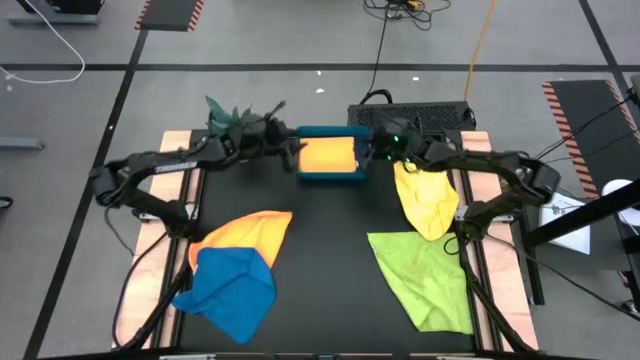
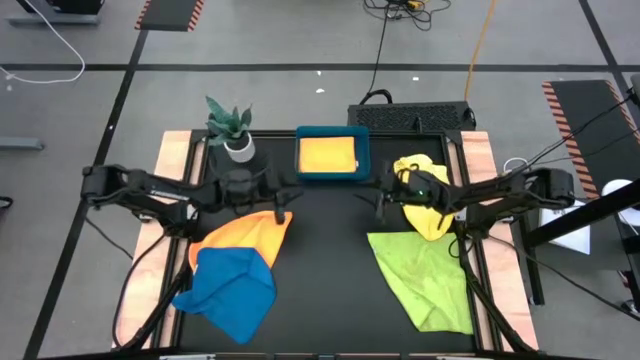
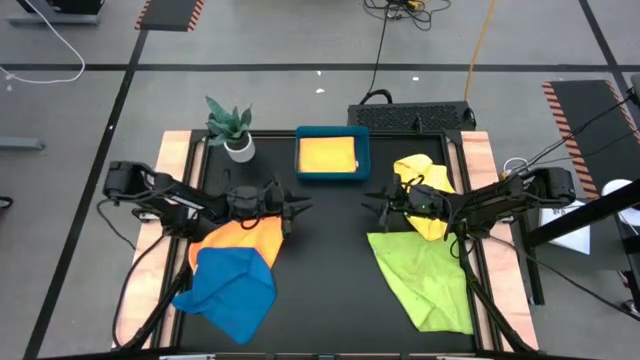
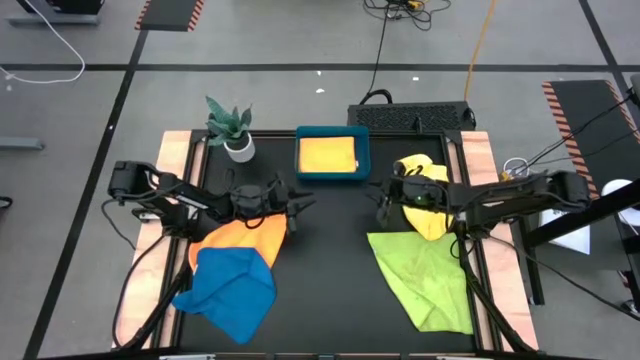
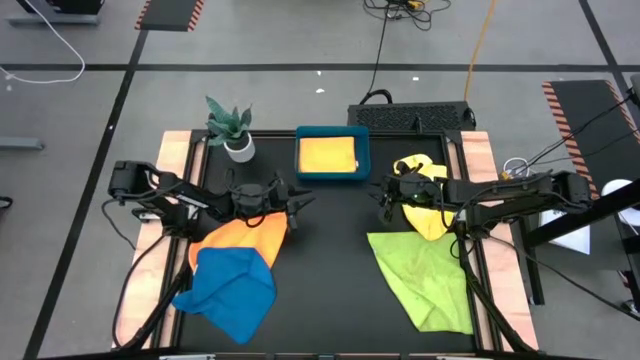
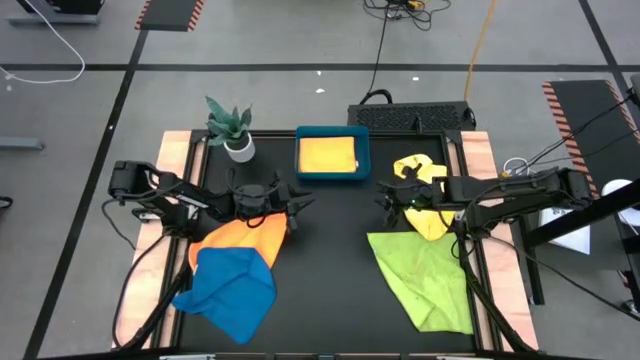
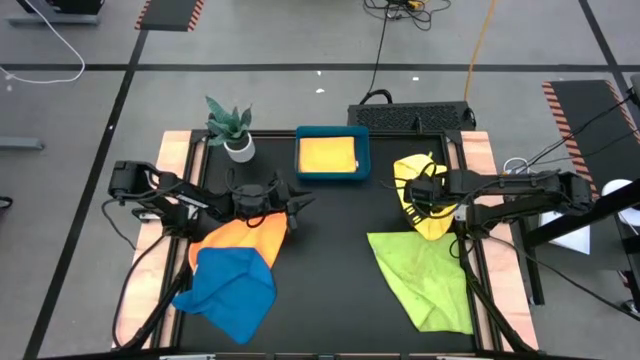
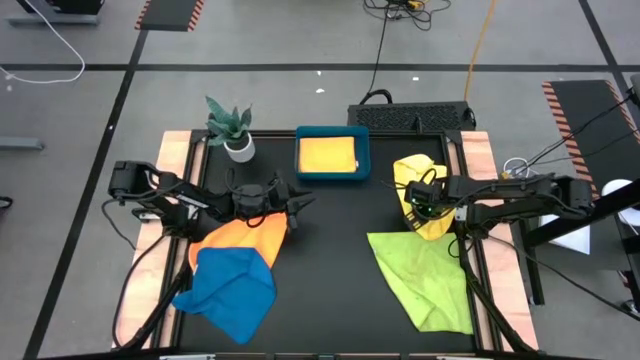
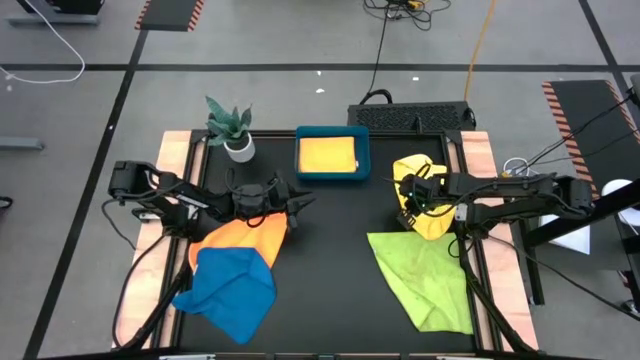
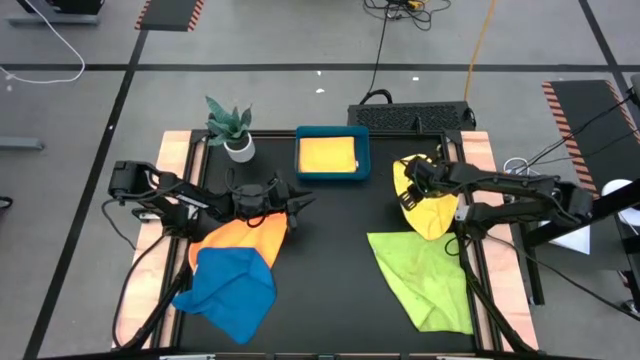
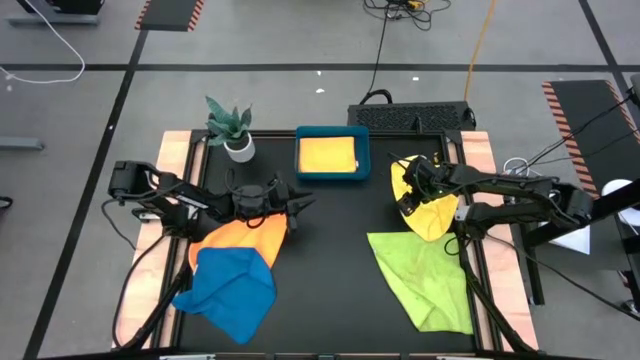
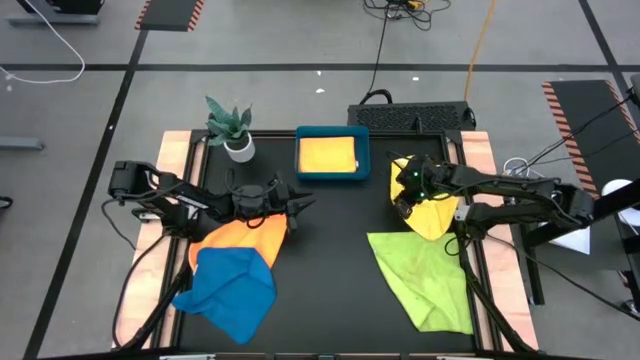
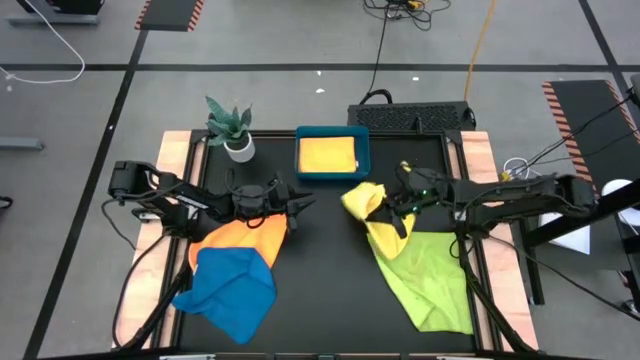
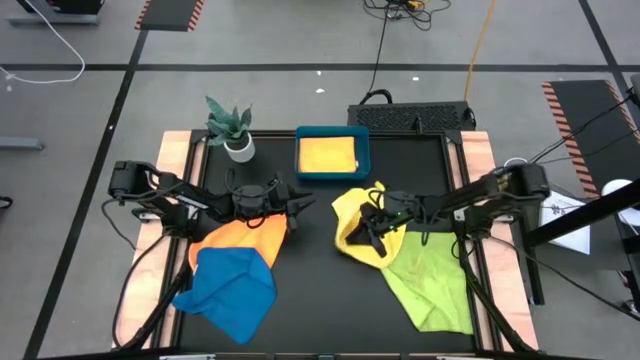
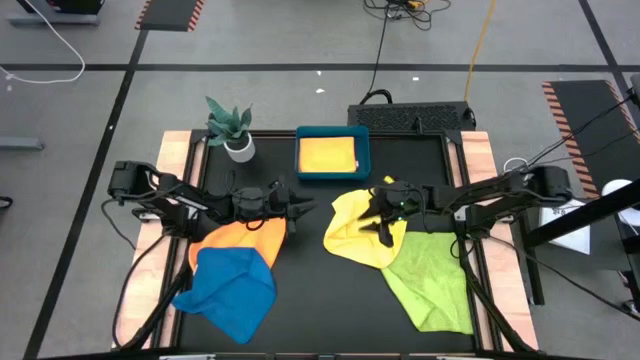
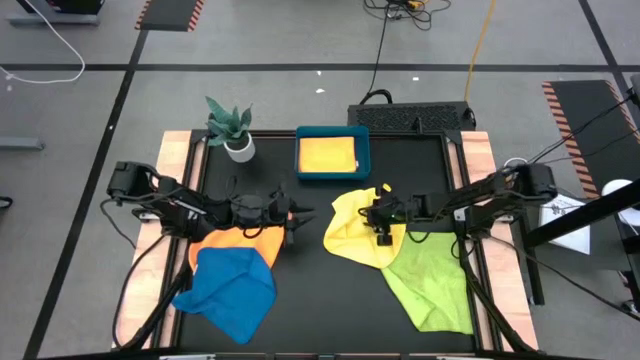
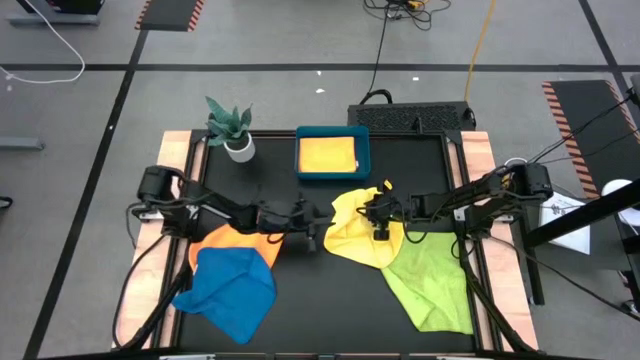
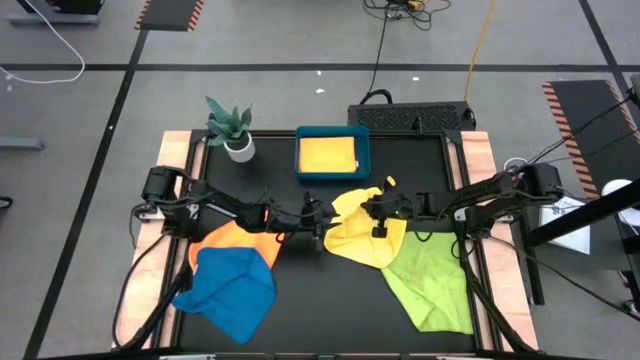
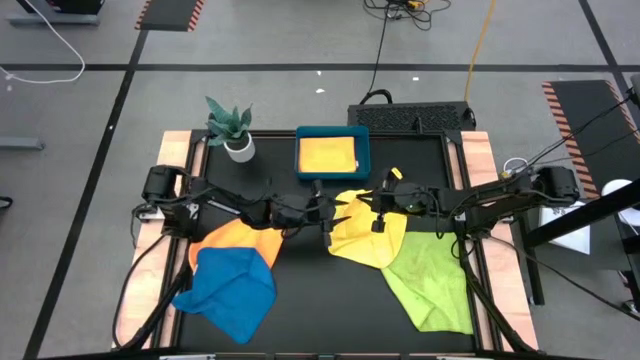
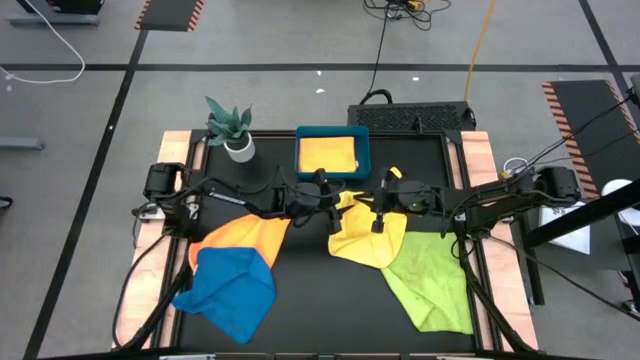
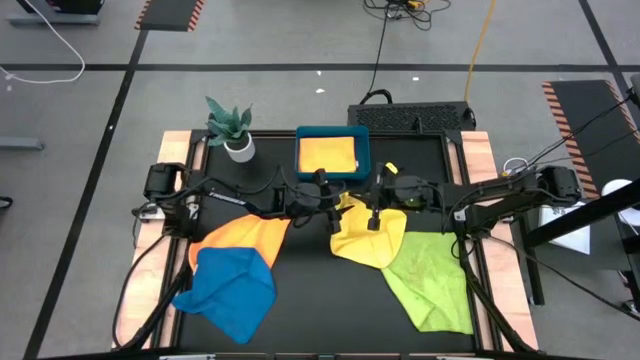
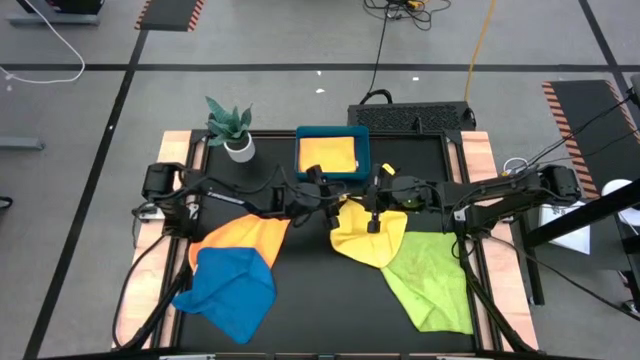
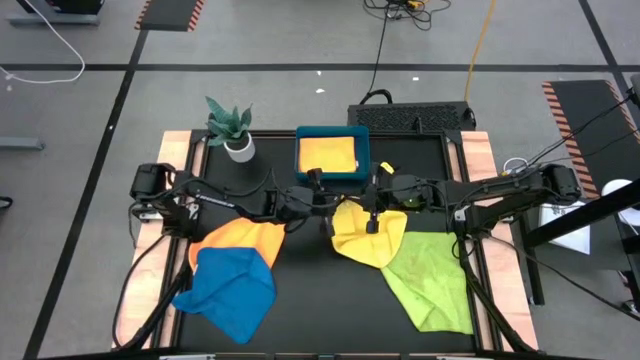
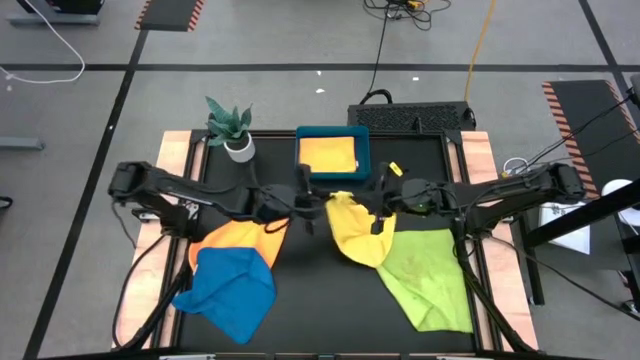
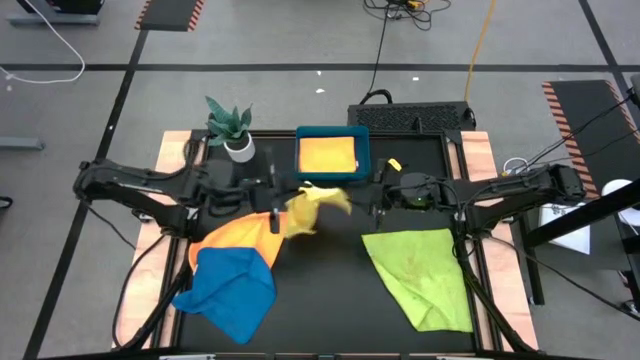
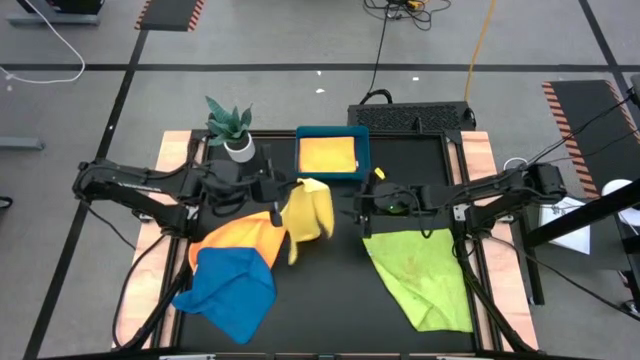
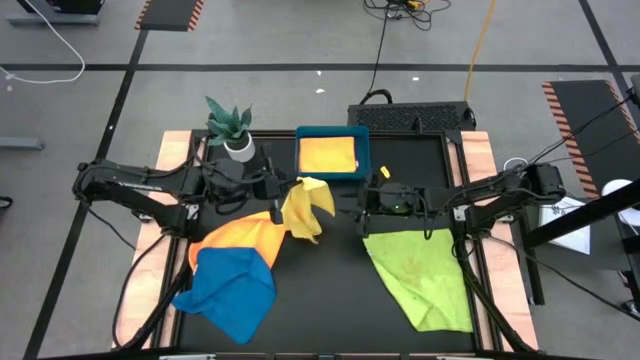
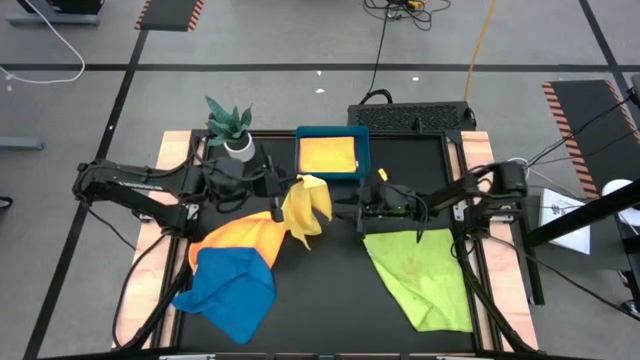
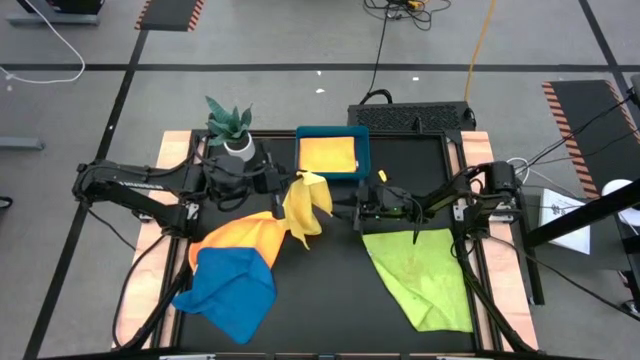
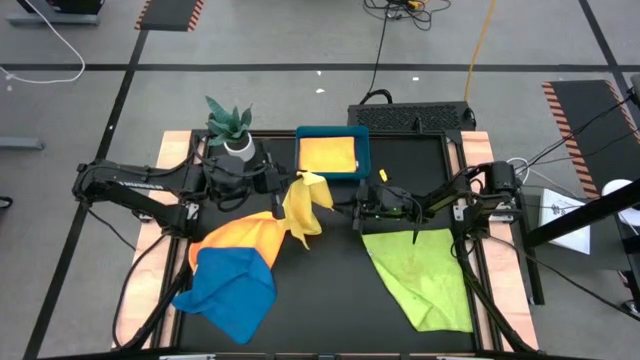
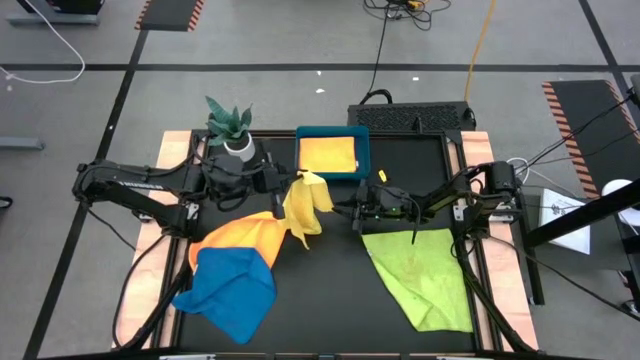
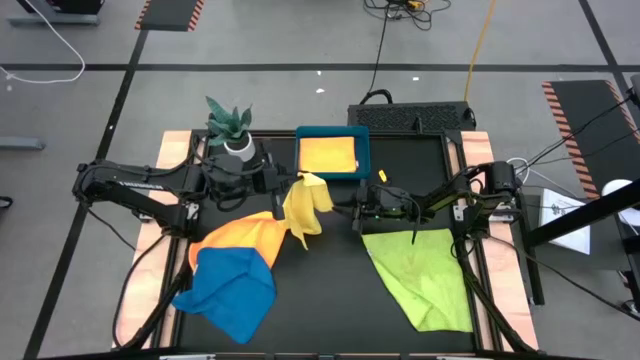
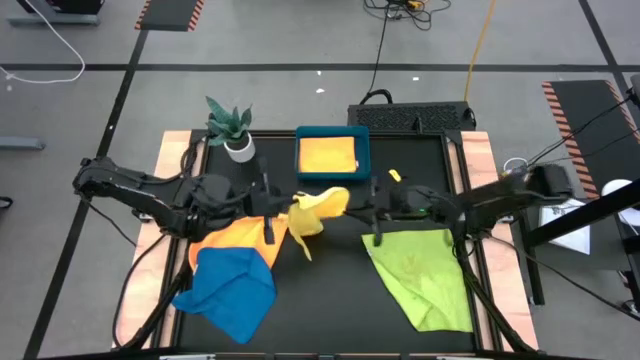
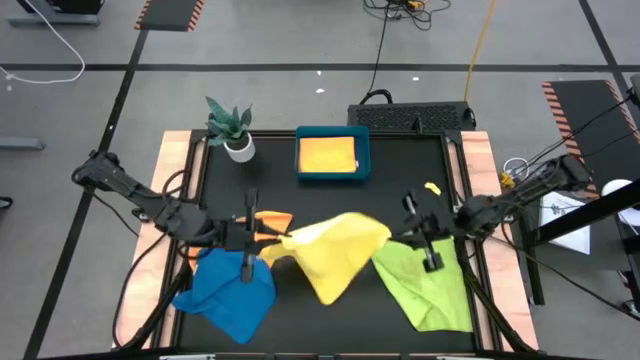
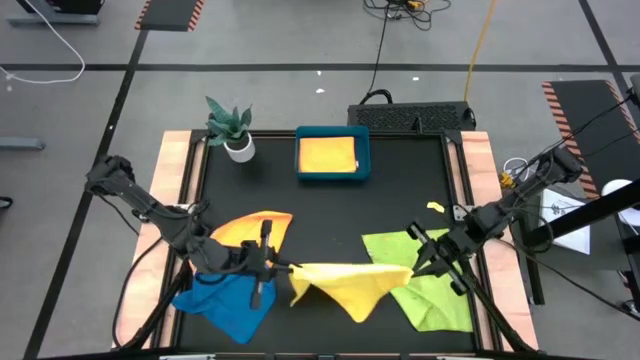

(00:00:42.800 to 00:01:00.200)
Task: Fold microfiber towels
Fold the yellow microfiber towel

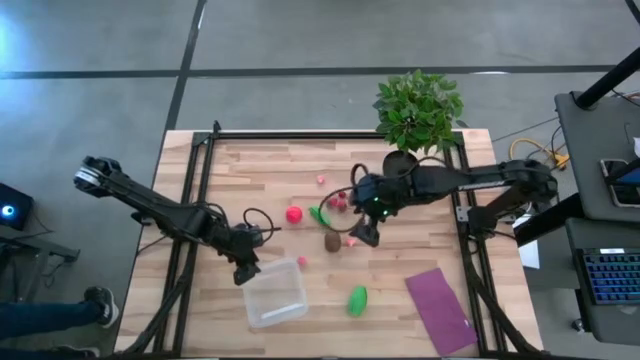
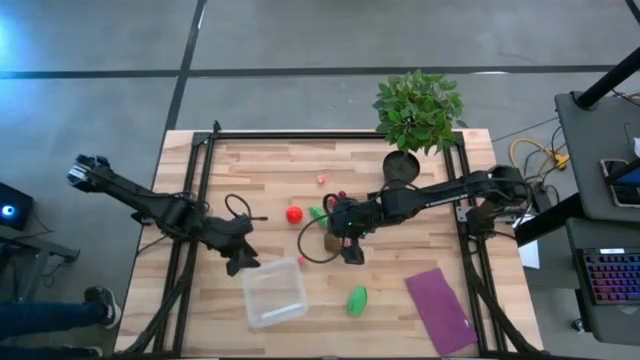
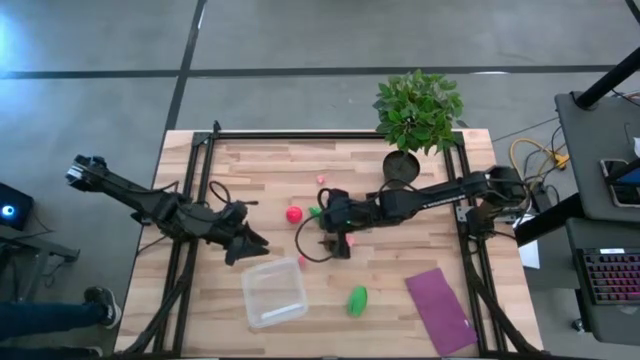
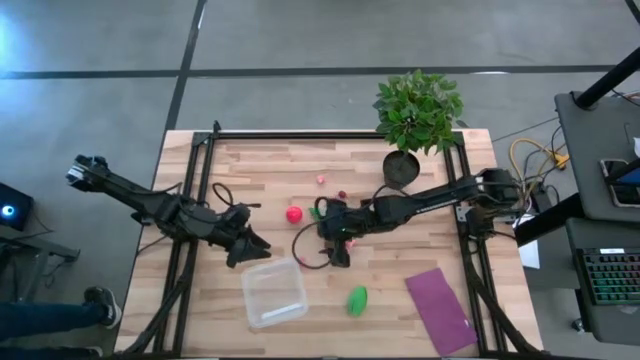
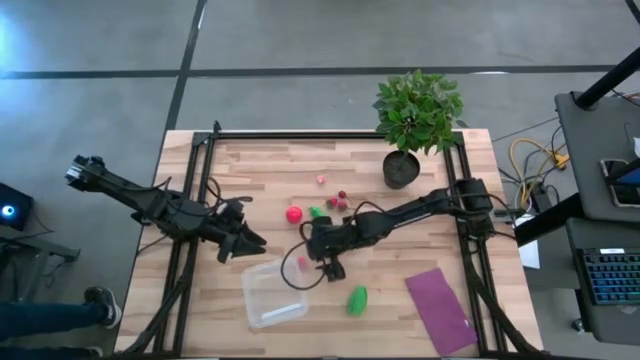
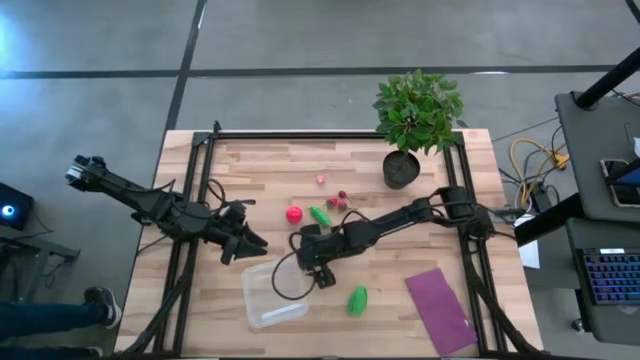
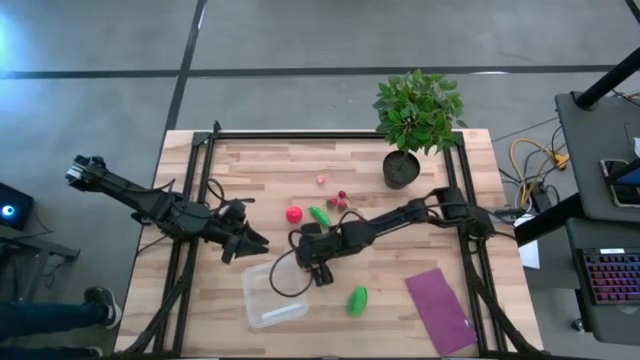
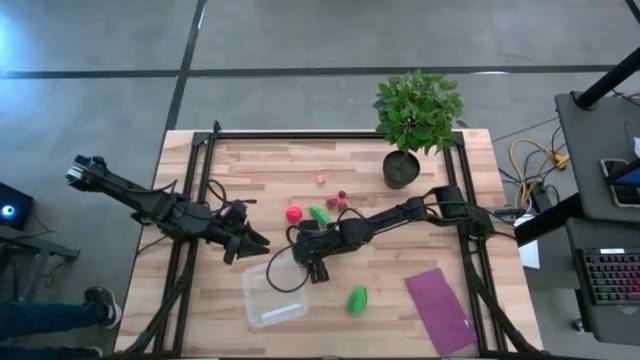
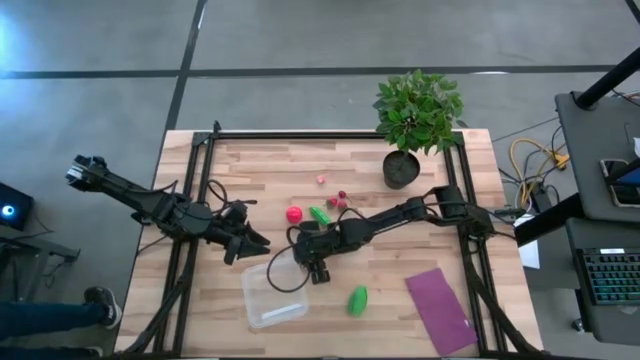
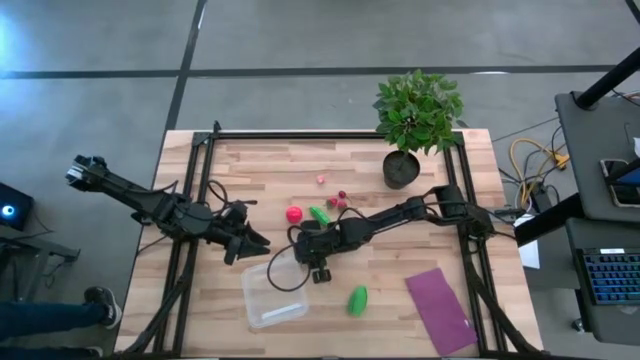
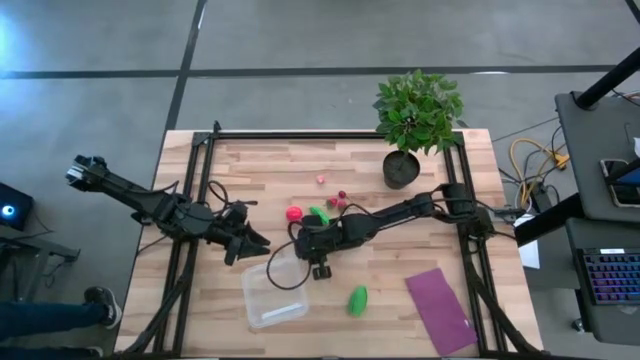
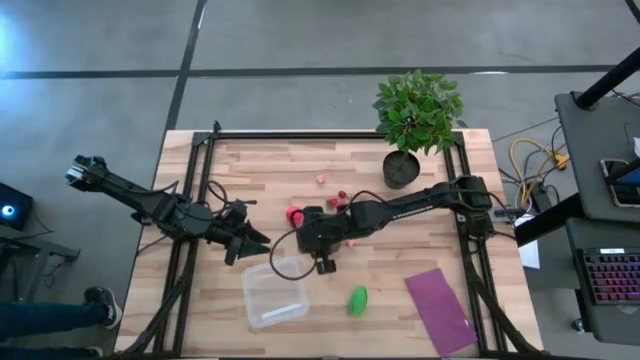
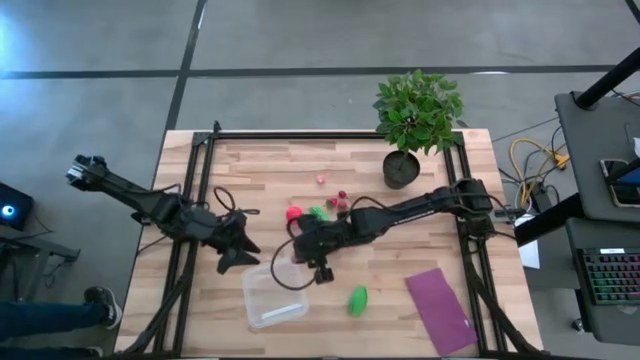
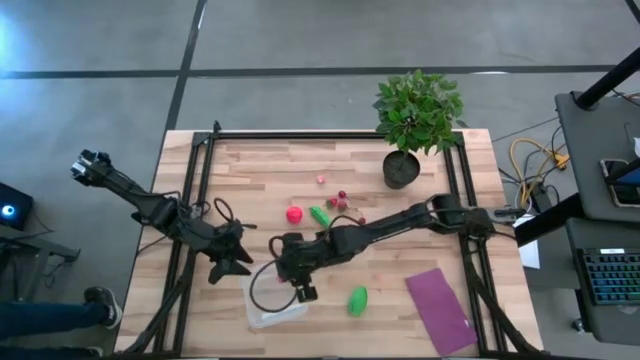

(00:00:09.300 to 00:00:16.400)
Task: Pick and placing Produce into tupperware
Put the bottom peach into the transparent bin
